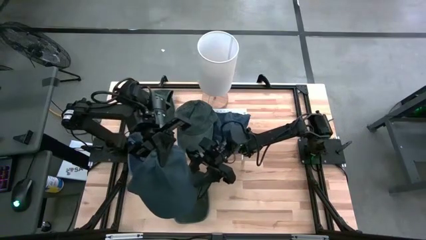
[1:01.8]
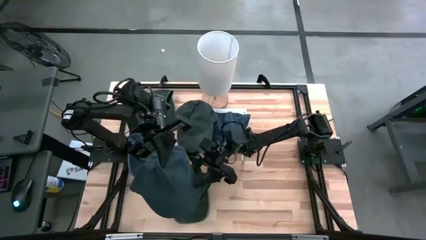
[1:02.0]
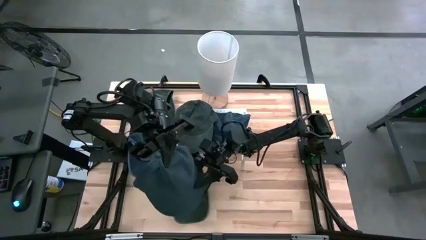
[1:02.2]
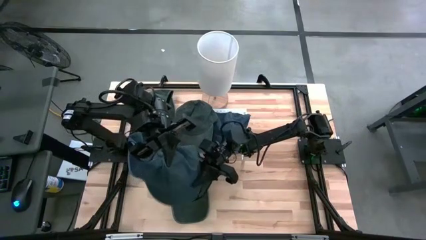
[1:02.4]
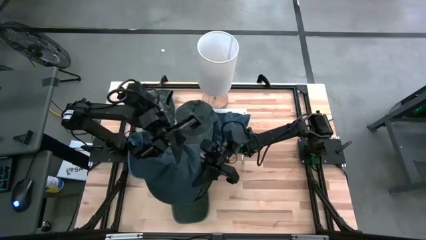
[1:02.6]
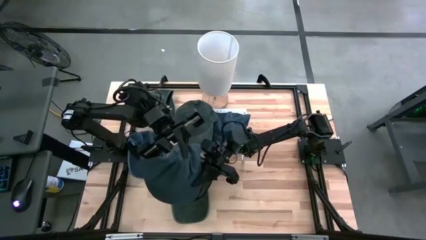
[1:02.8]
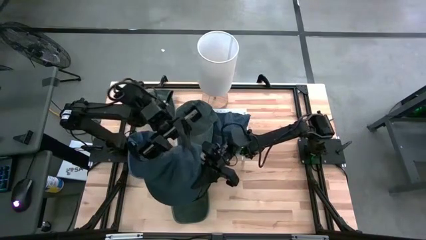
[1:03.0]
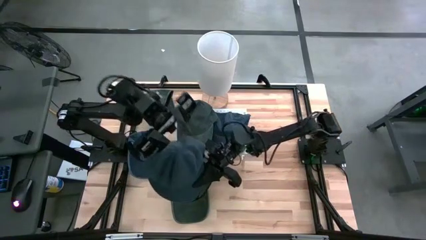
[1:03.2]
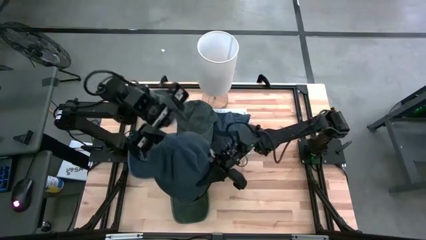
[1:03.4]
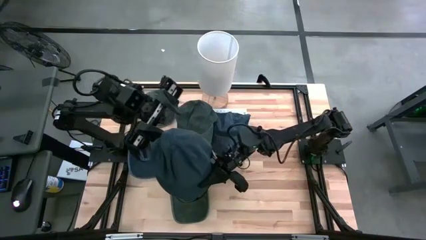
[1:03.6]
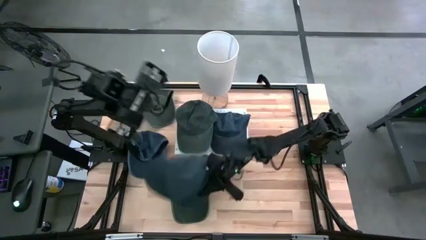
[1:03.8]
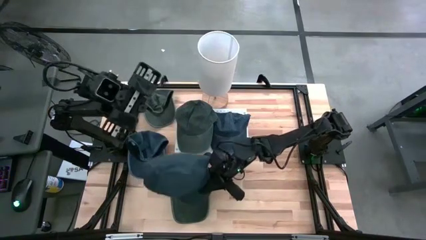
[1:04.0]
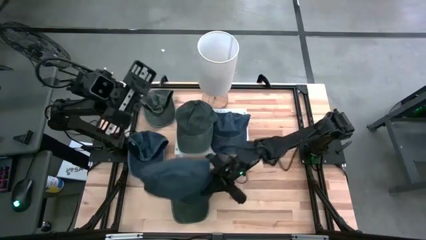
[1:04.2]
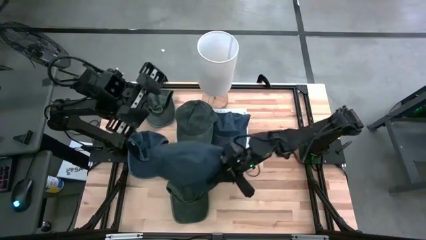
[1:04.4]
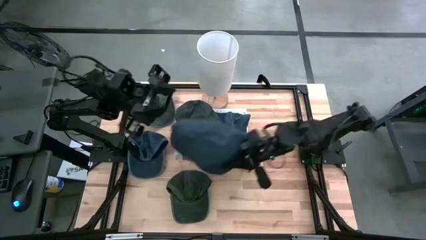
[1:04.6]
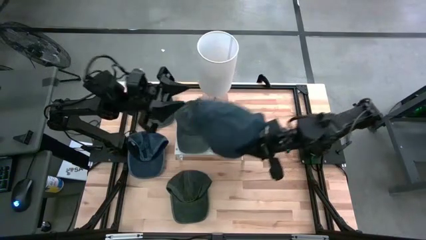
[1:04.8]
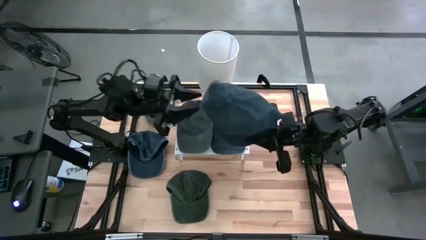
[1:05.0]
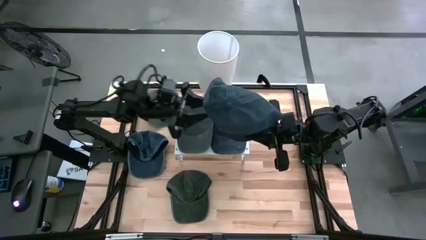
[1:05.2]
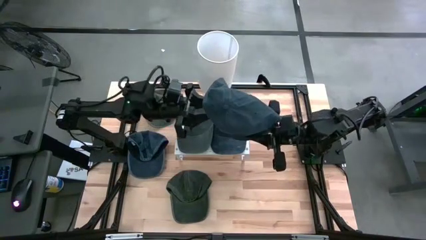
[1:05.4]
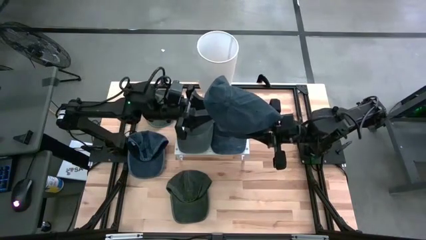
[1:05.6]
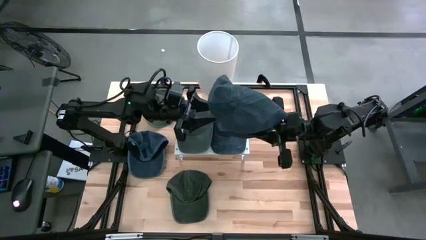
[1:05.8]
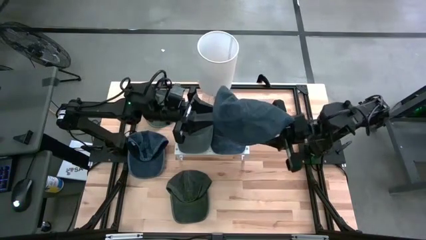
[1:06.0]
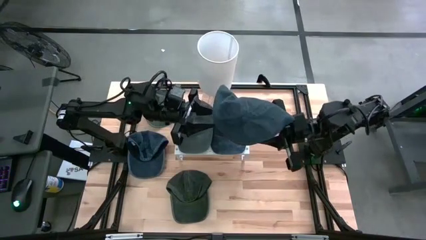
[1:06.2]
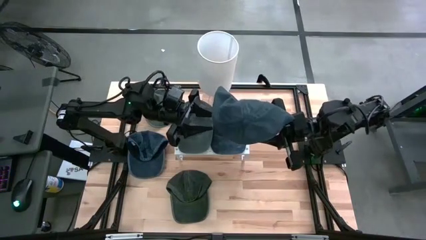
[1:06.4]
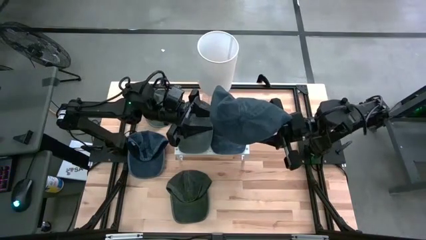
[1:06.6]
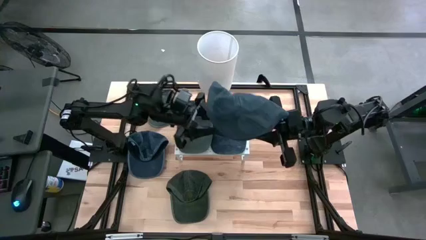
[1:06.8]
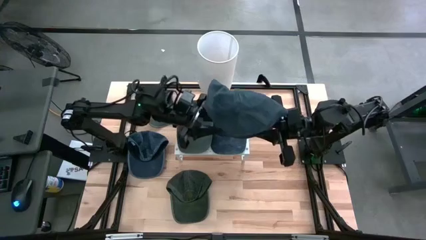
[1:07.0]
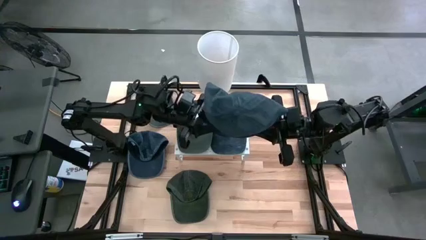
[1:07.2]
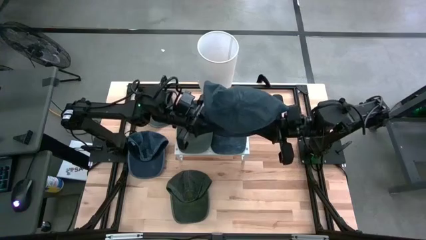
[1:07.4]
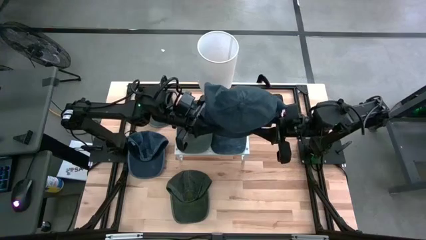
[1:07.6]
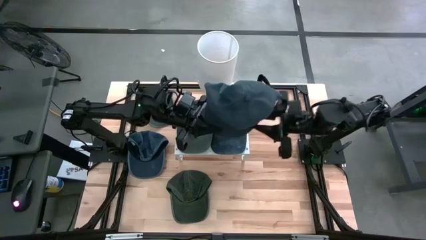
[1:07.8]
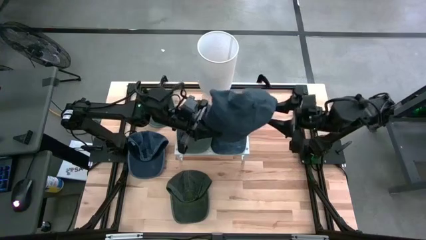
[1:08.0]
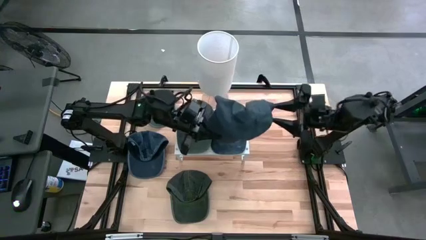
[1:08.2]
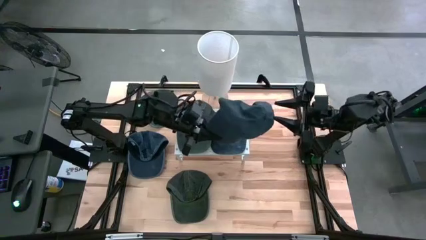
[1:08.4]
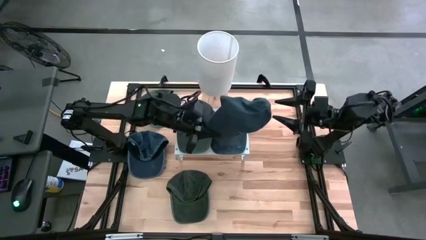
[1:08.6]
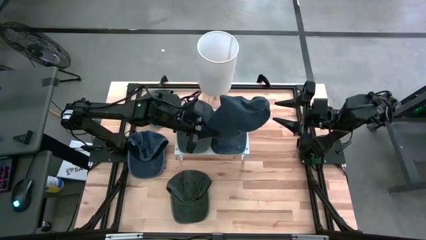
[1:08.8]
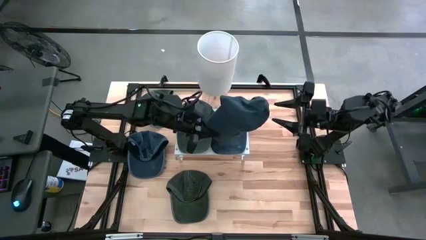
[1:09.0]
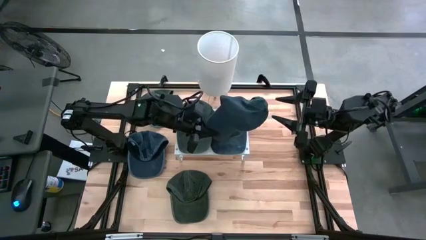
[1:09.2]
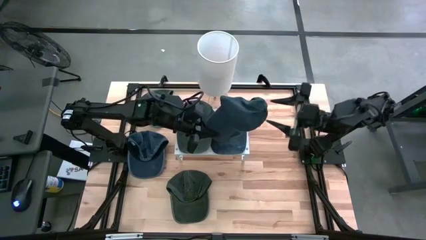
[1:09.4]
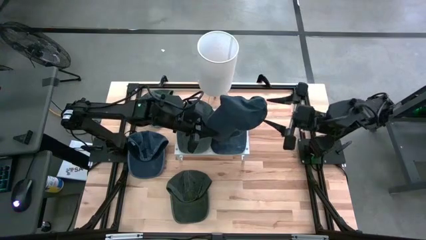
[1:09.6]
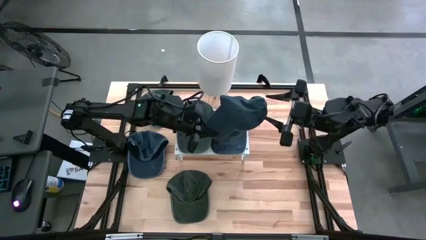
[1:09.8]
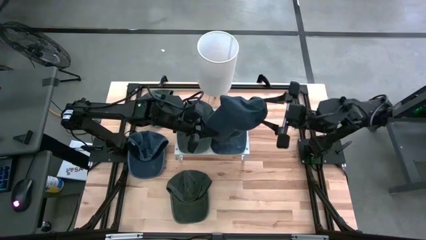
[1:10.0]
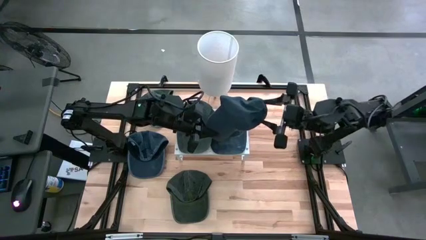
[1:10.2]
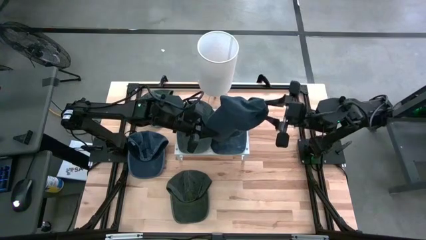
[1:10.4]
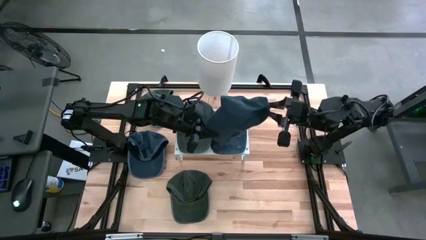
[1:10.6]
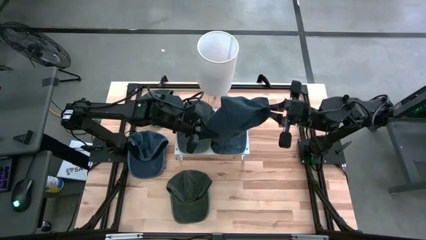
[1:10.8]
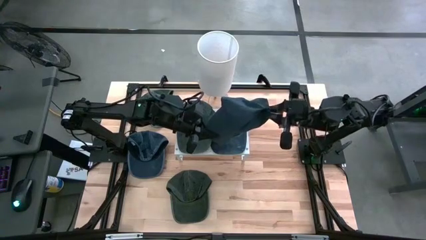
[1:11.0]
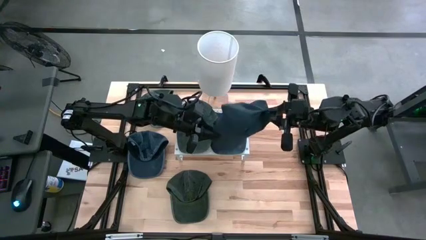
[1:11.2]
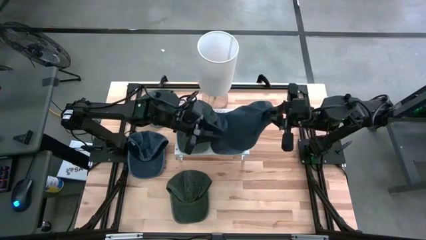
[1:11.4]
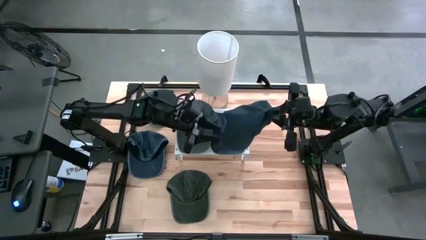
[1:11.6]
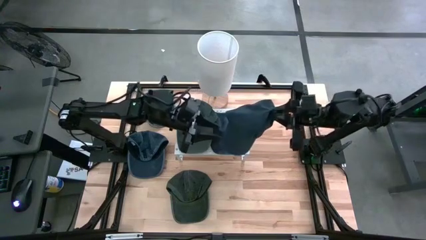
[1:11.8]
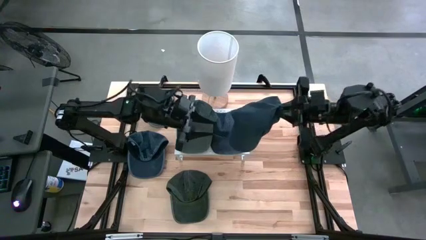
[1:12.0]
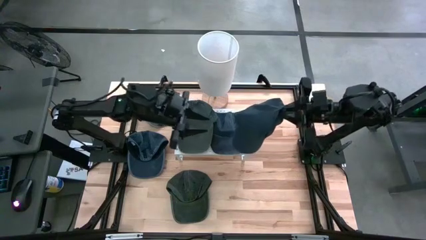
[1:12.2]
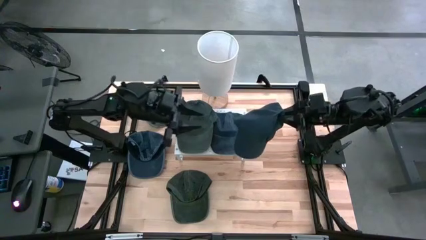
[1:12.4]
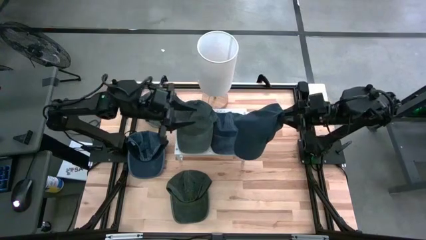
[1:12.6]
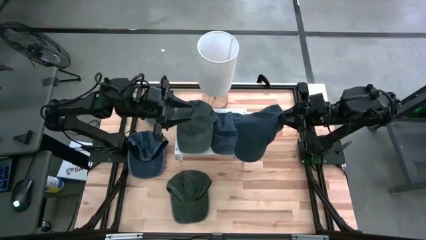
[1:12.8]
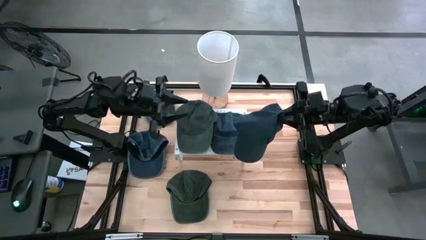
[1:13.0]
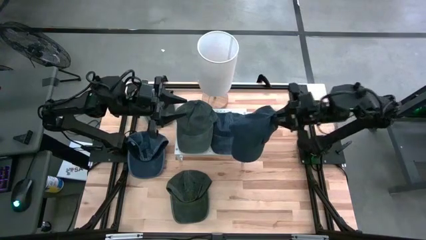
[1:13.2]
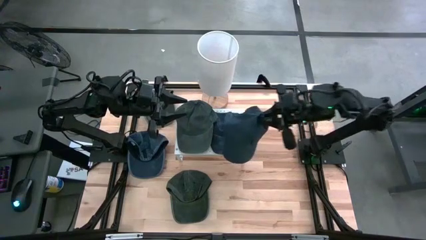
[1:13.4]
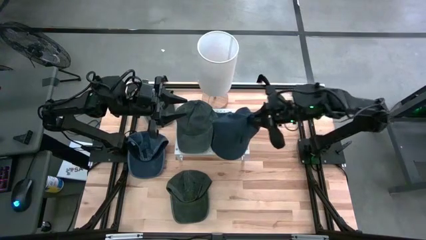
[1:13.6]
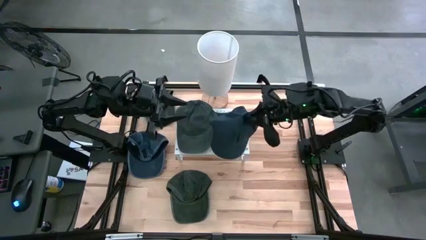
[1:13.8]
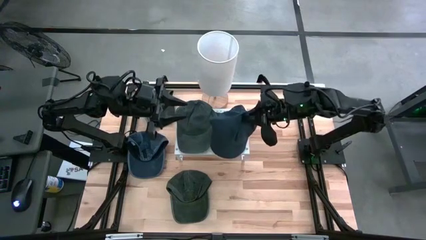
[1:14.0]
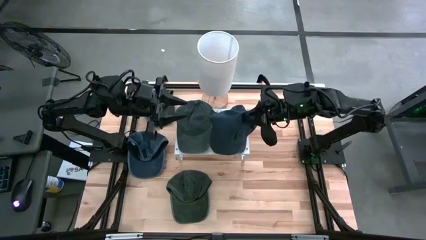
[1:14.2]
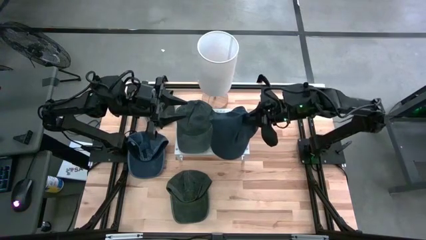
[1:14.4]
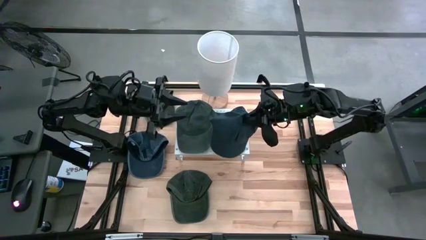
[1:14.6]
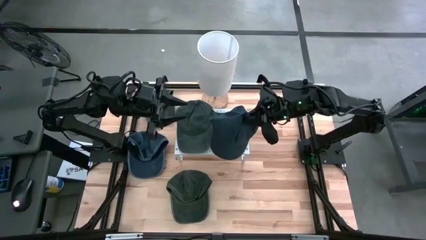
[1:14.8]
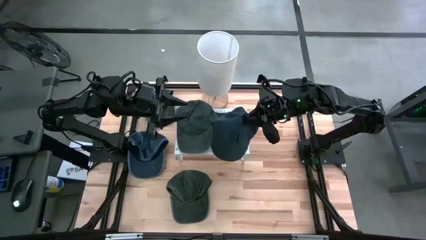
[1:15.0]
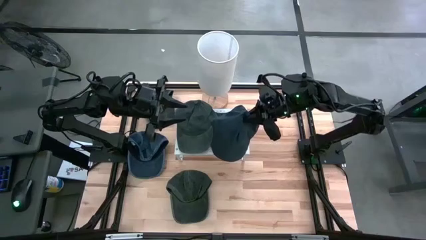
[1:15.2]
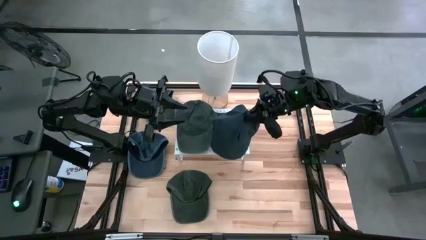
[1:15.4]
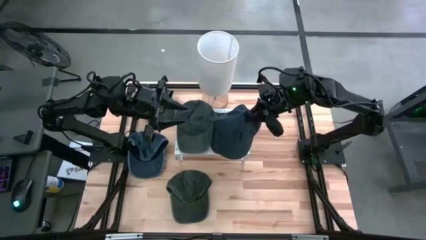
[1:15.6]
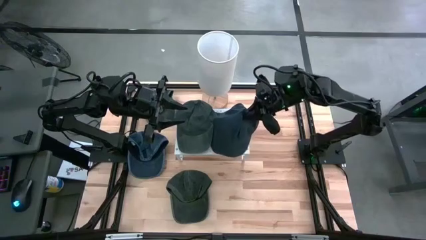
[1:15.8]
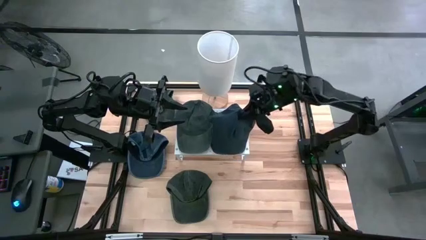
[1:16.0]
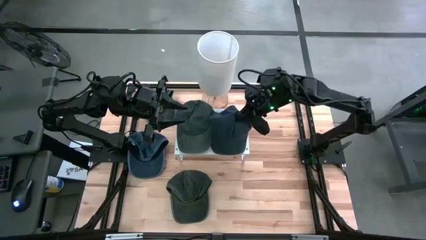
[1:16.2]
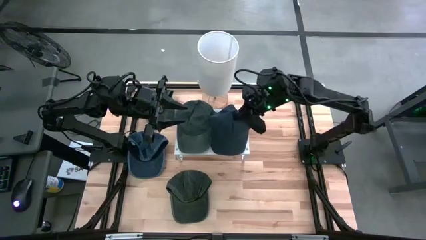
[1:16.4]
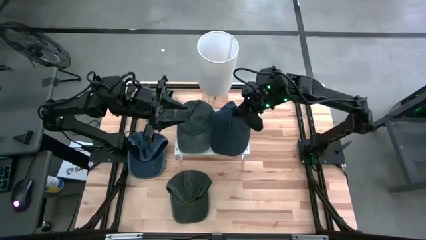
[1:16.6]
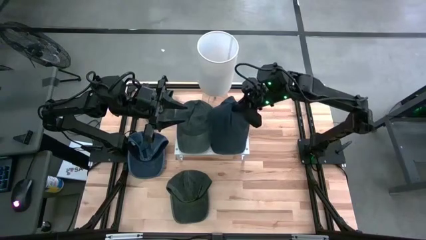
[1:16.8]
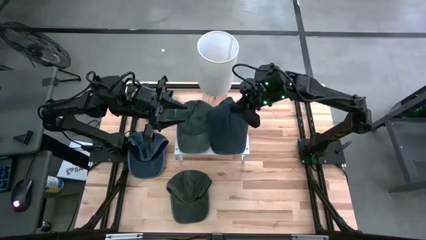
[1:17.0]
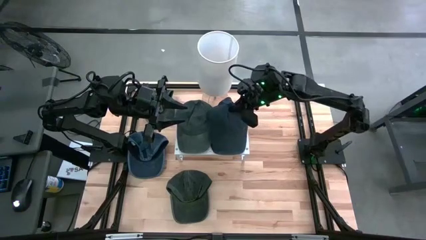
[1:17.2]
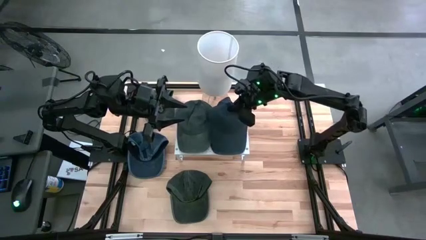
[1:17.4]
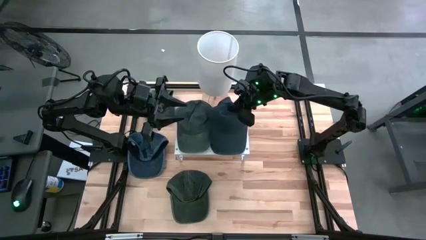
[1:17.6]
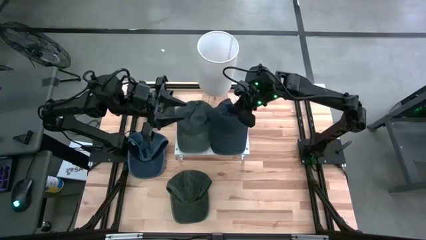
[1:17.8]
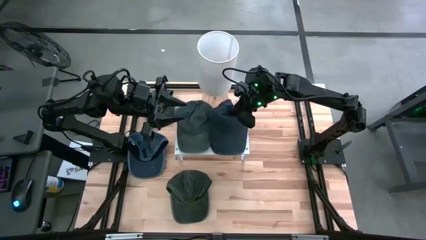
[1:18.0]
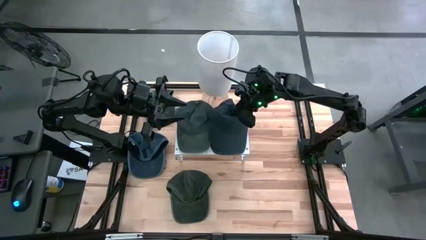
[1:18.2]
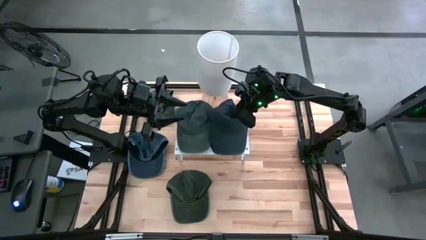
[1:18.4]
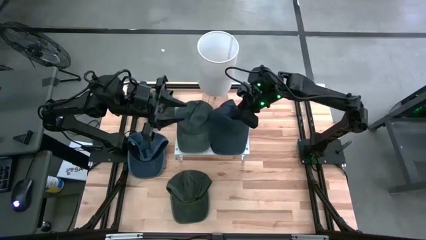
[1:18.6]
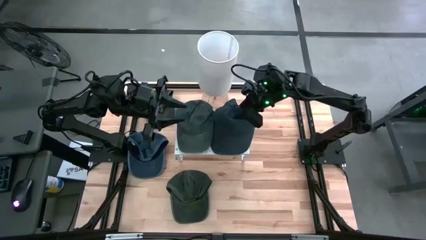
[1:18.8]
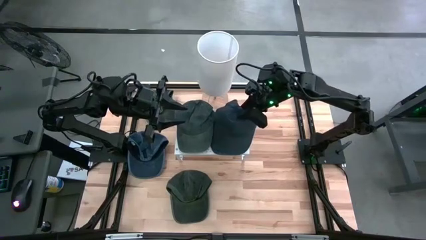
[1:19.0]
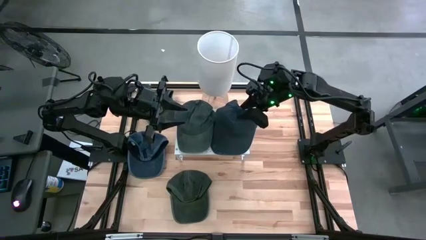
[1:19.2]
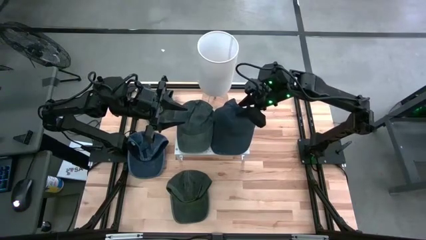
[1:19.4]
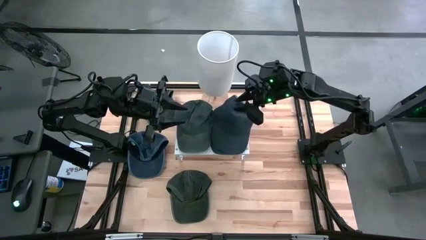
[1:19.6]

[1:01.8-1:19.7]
Task: Pick & Place hat
Stack the bottom blue cap on the blue cap on the shelf
